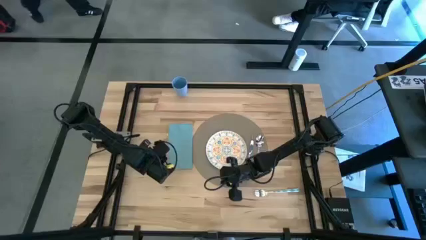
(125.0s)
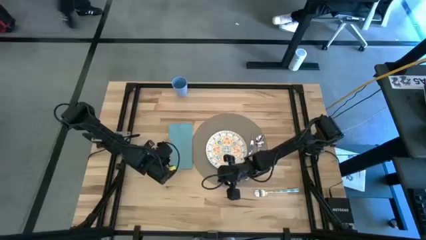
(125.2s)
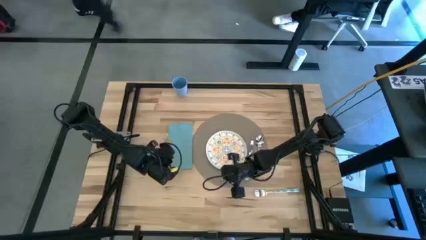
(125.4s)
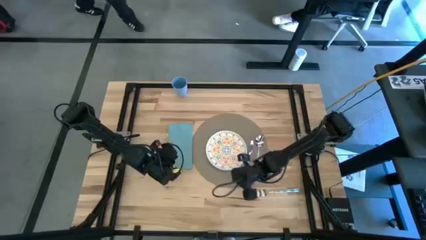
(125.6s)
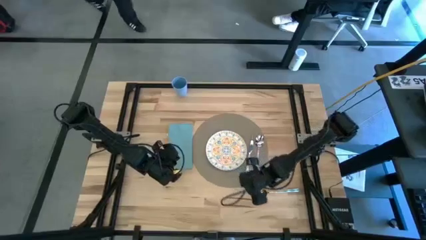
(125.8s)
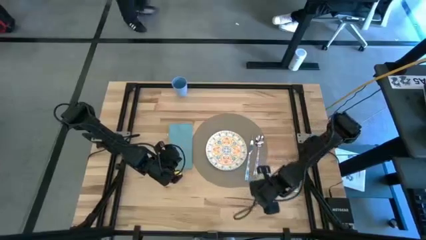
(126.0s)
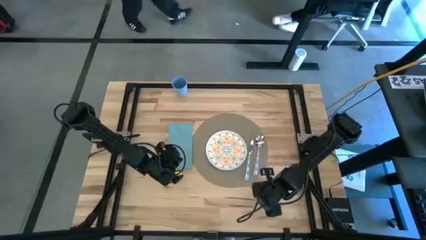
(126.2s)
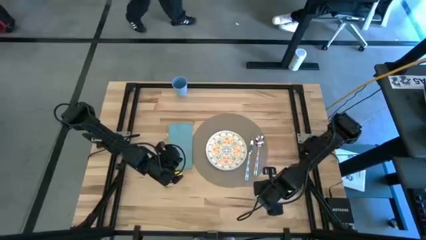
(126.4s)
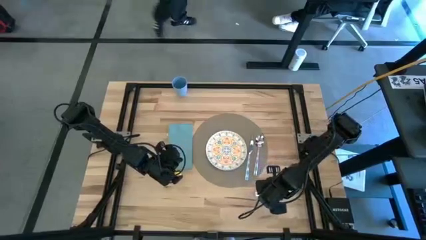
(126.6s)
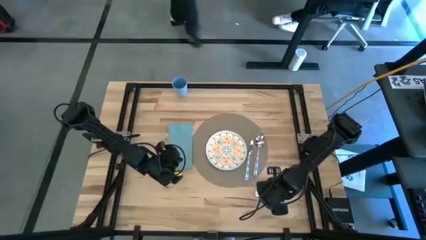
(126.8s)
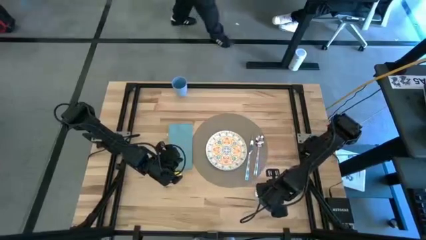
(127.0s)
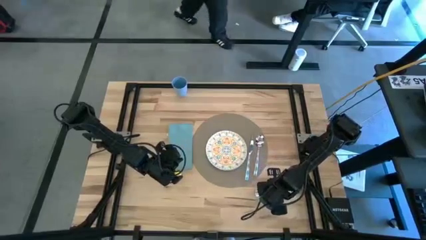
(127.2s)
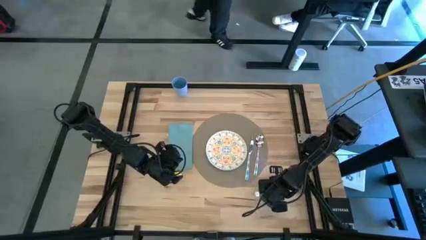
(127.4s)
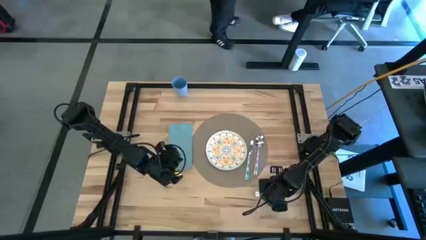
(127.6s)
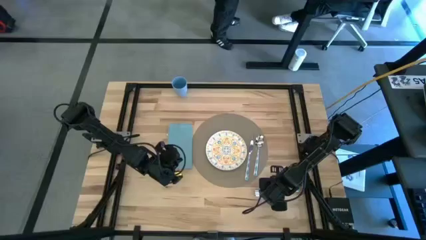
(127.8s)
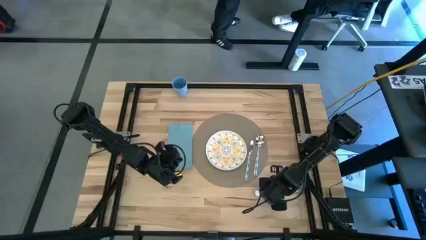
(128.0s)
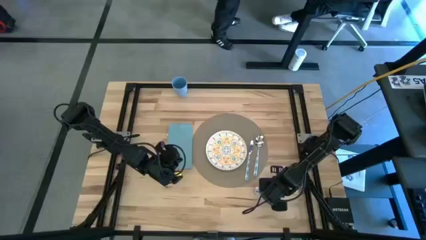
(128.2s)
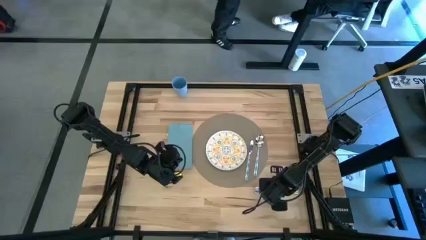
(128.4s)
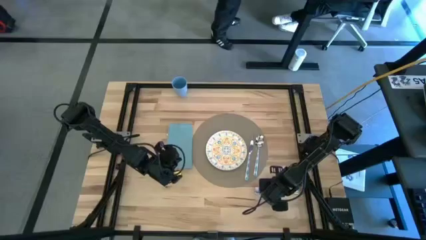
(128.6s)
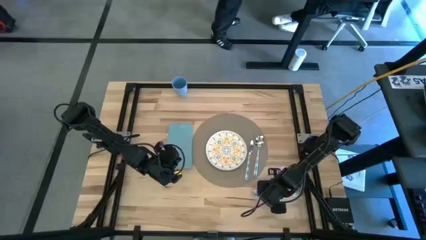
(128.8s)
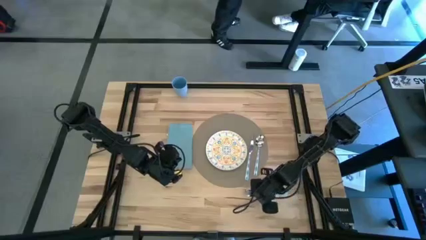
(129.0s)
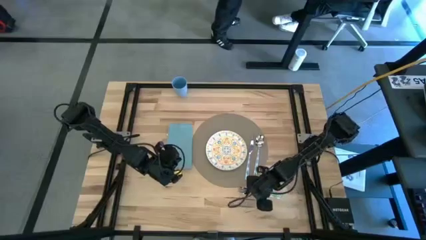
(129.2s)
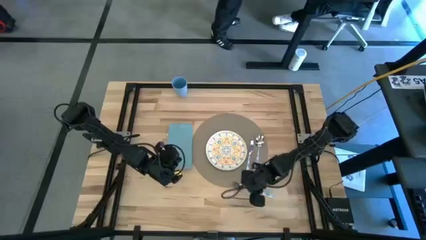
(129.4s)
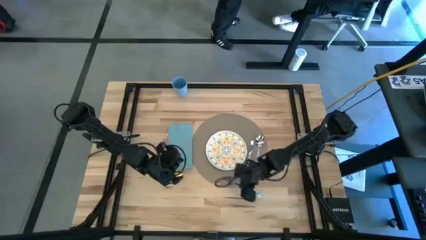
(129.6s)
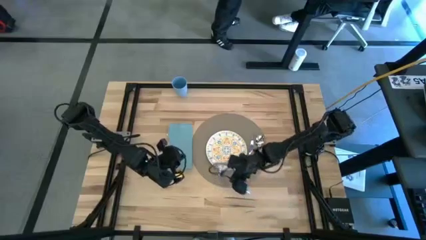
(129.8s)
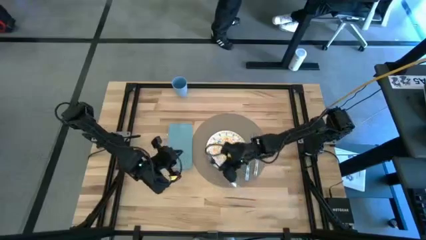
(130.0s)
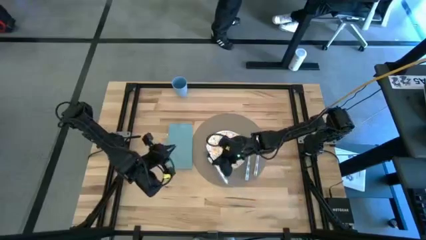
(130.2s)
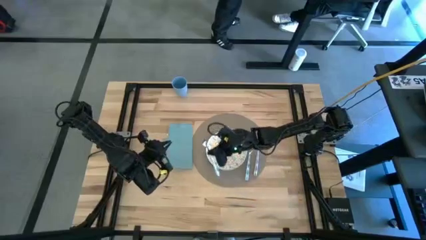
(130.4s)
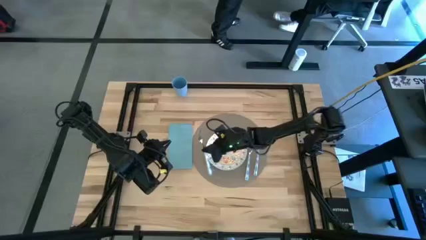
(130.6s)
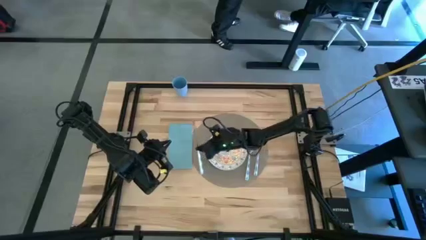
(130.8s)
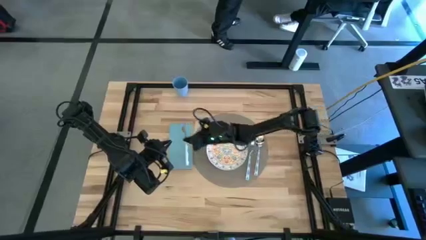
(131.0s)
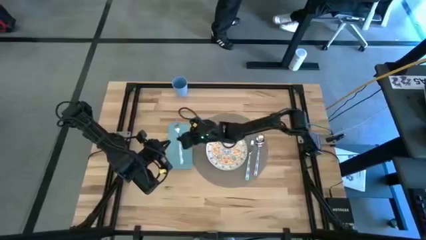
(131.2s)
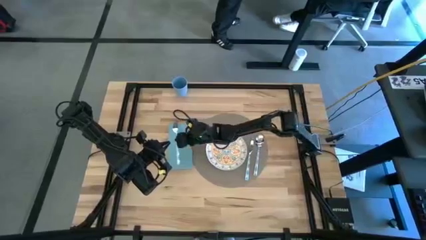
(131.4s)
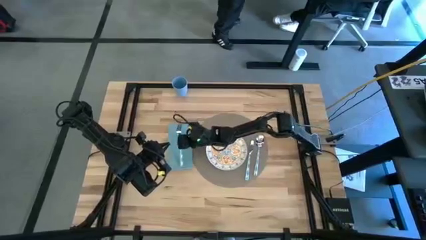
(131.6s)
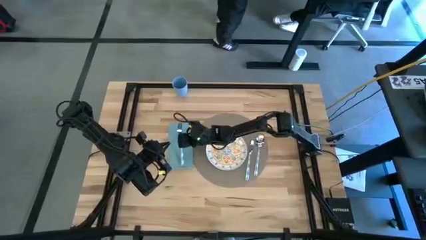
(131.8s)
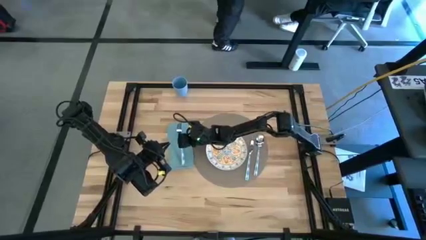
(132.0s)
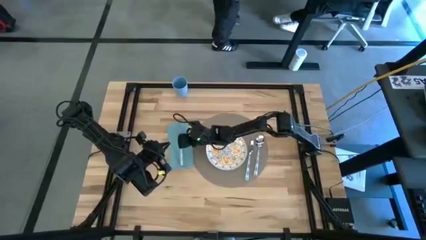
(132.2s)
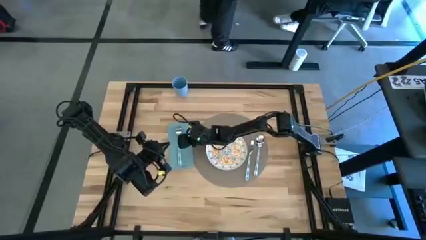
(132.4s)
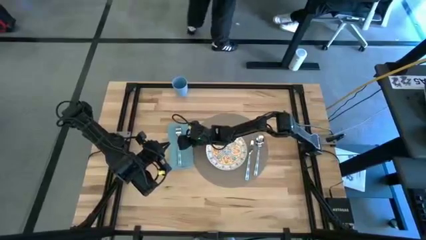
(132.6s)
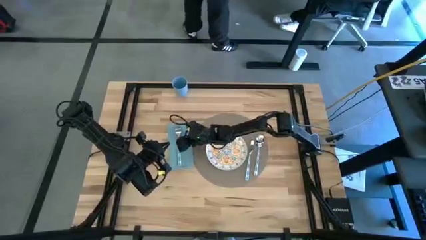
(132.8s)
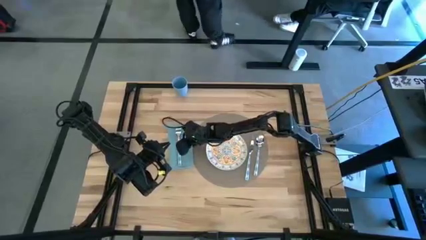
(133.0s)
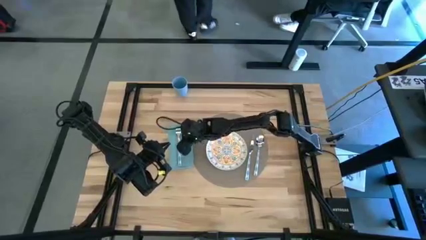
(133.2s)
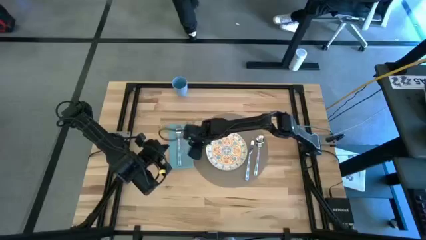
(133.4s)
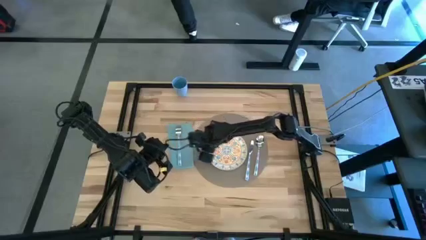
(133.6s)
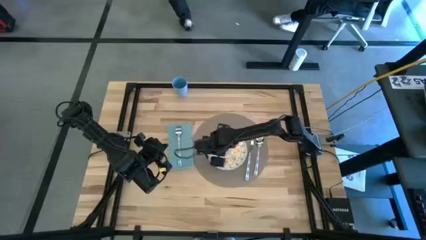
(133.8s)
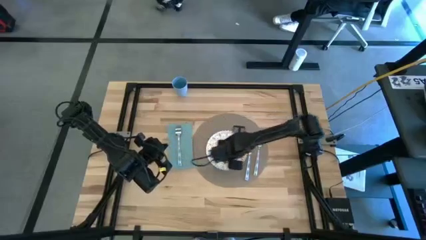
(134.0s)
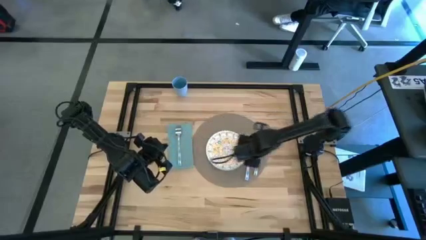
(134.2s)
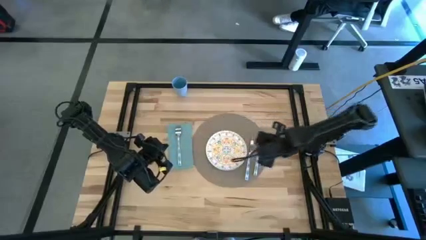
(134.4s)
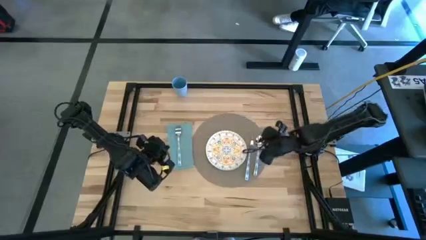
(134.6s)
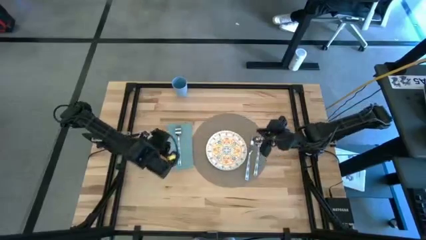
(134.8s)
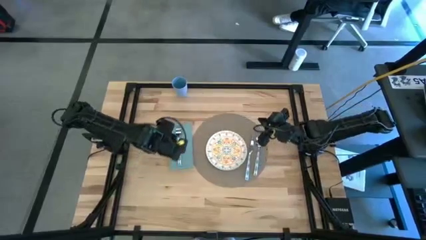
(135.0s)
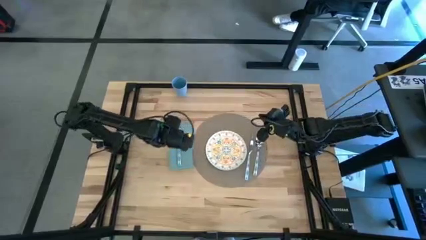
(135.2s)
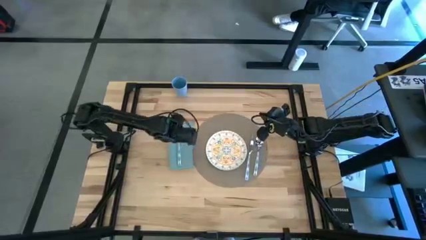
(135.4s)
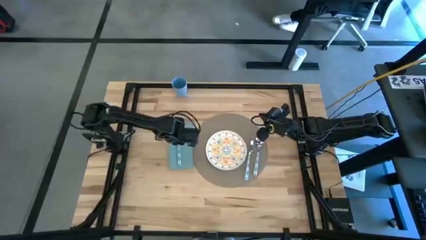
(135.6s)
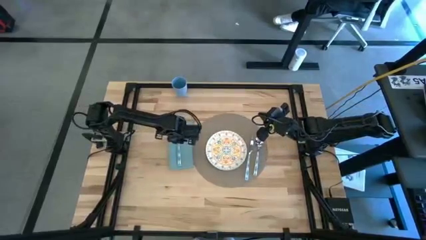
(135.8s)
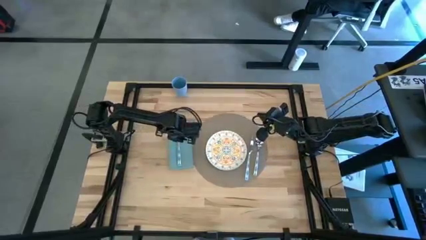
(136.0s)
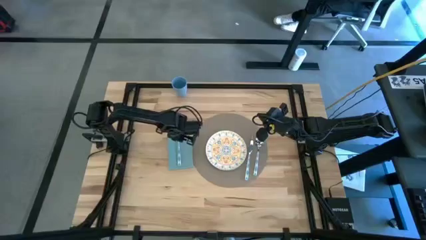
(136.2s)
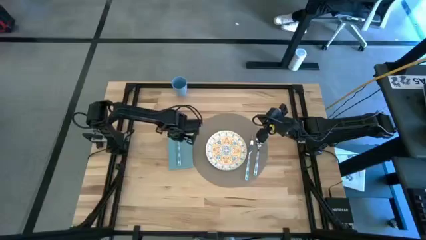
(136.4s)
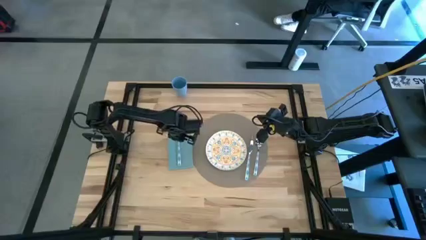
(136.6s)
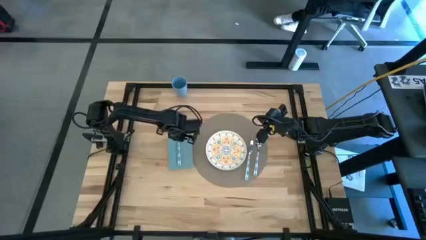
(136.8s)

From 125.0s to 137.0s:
Task: Set table place
Put the blue fork on the blue napkin
